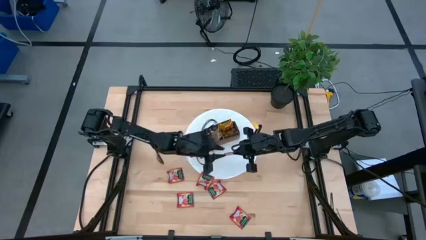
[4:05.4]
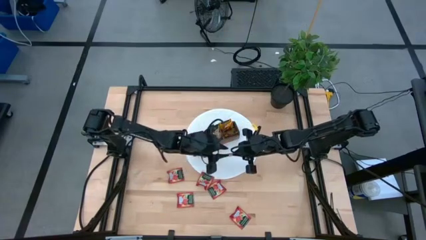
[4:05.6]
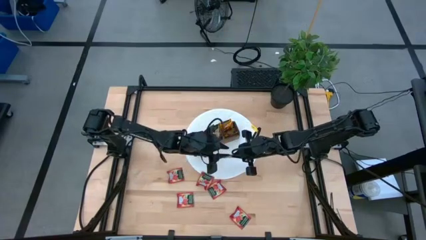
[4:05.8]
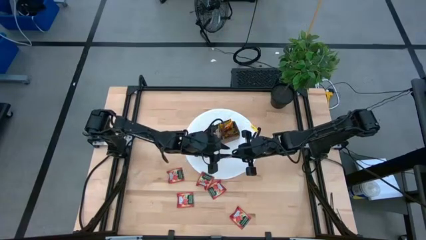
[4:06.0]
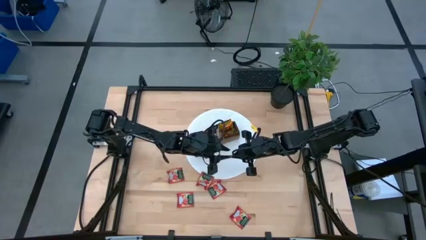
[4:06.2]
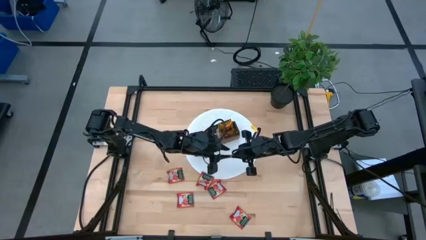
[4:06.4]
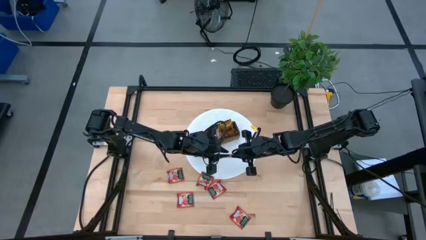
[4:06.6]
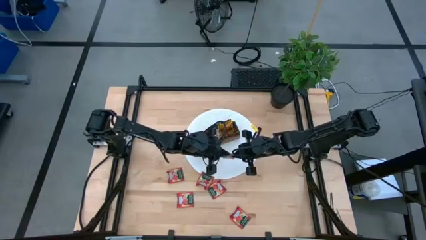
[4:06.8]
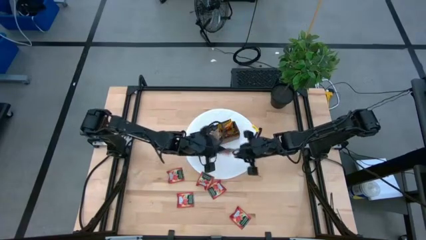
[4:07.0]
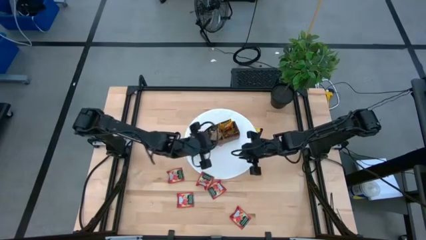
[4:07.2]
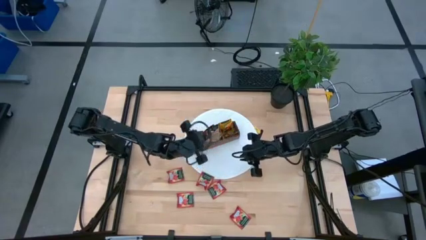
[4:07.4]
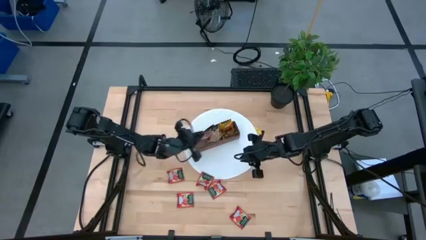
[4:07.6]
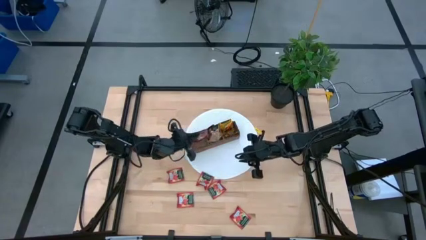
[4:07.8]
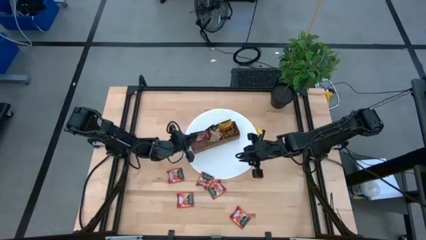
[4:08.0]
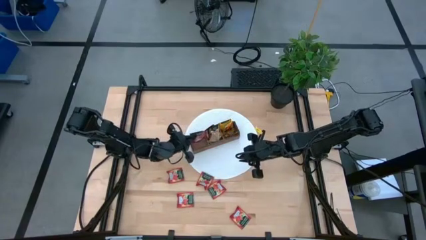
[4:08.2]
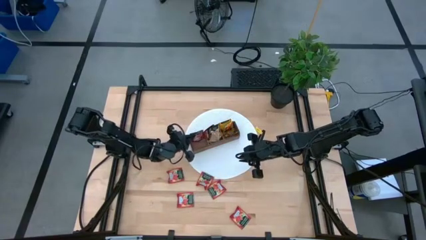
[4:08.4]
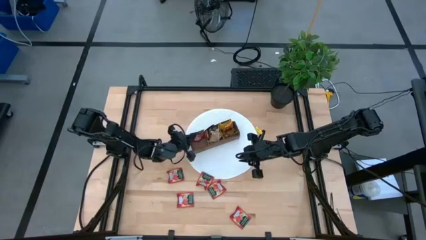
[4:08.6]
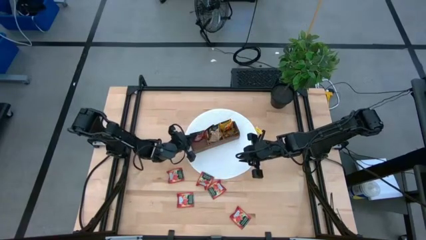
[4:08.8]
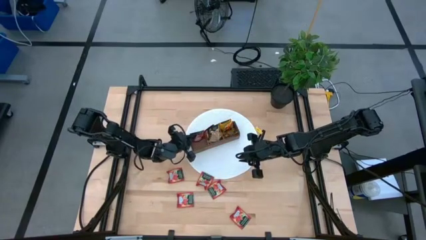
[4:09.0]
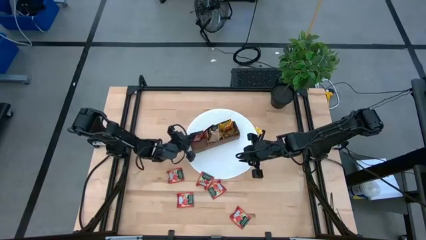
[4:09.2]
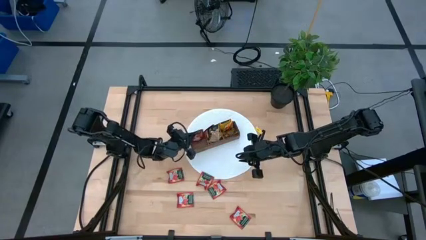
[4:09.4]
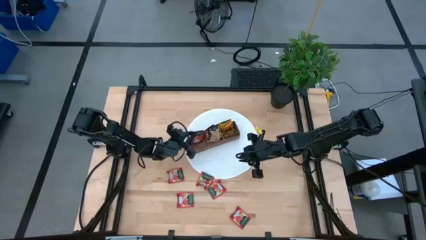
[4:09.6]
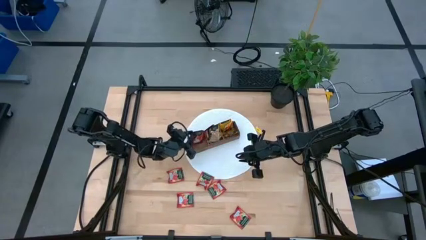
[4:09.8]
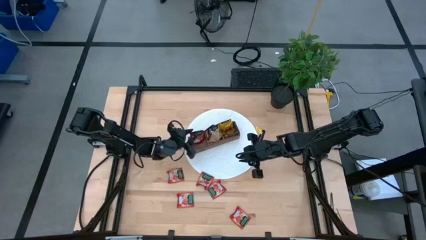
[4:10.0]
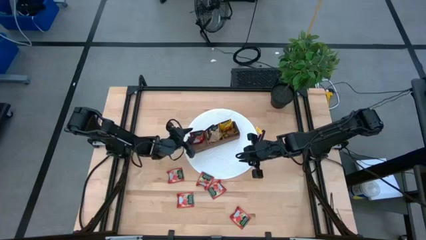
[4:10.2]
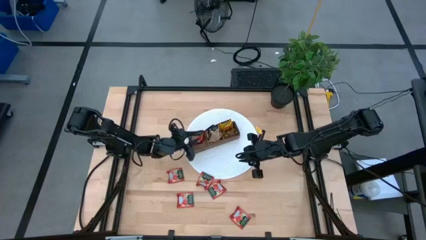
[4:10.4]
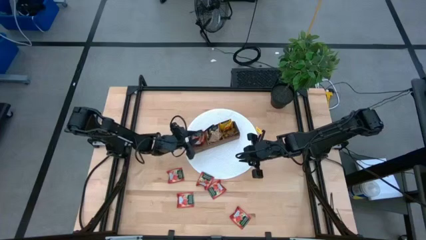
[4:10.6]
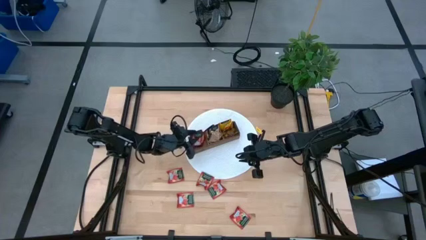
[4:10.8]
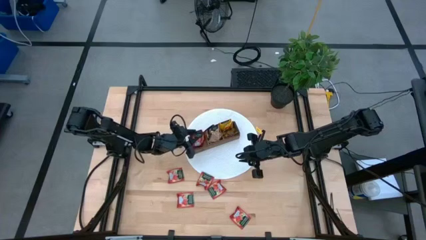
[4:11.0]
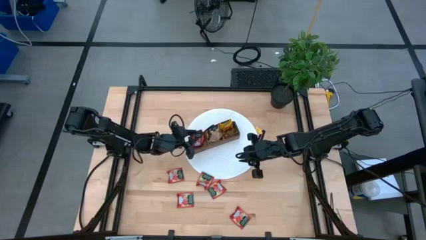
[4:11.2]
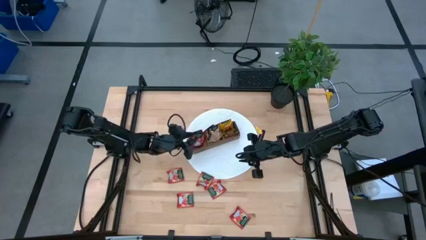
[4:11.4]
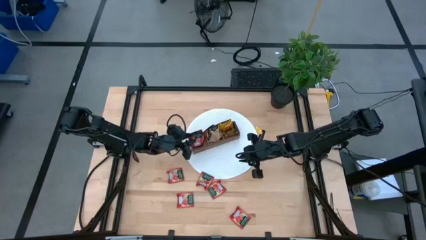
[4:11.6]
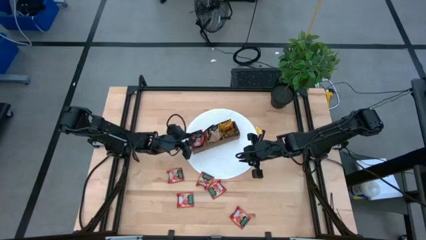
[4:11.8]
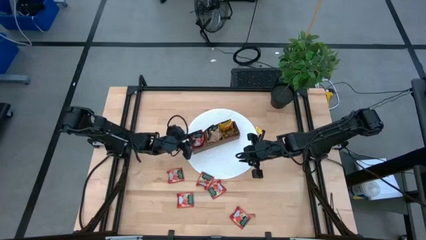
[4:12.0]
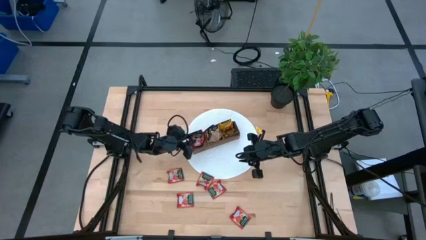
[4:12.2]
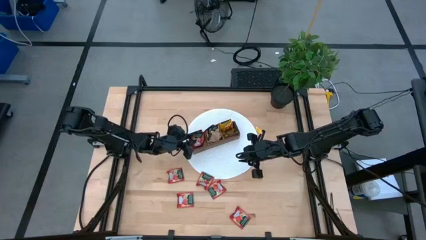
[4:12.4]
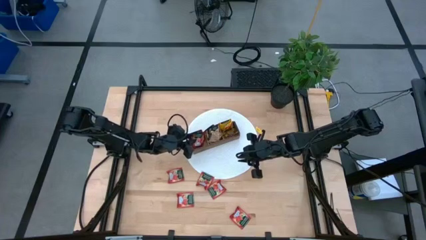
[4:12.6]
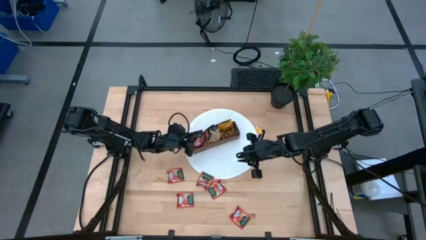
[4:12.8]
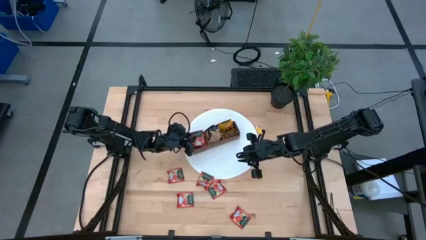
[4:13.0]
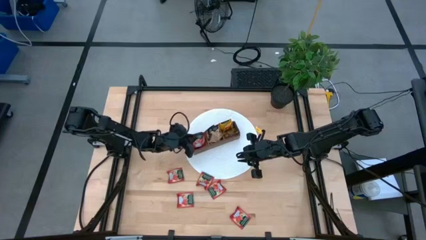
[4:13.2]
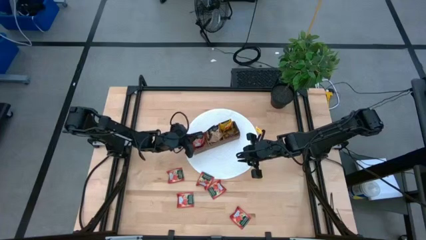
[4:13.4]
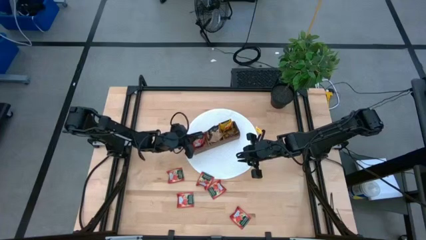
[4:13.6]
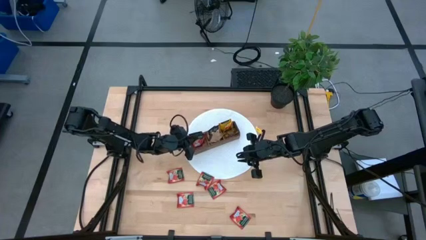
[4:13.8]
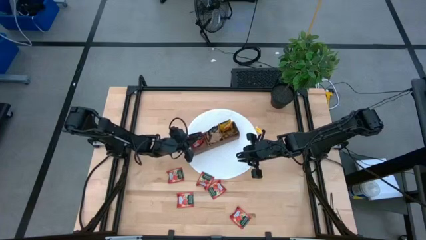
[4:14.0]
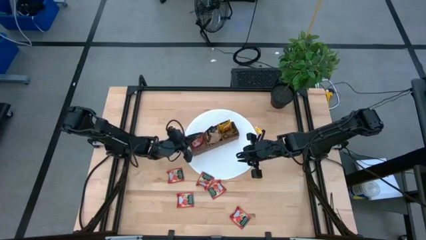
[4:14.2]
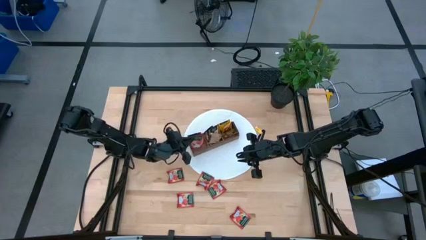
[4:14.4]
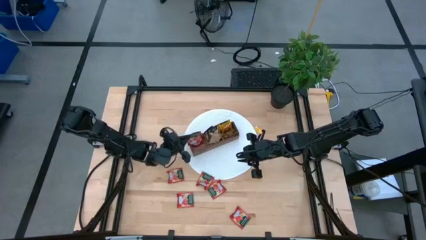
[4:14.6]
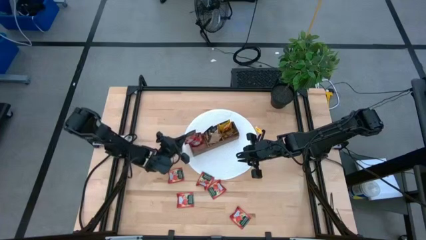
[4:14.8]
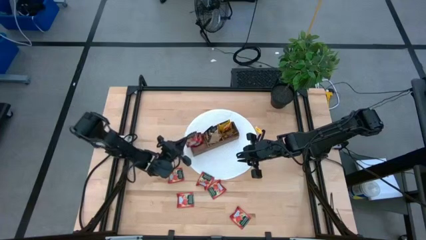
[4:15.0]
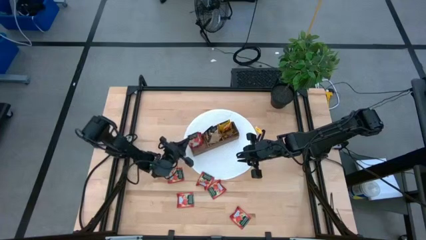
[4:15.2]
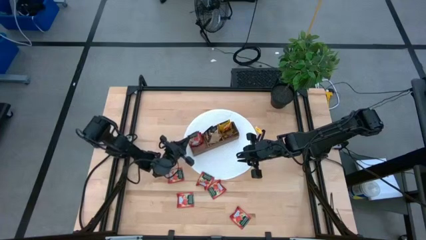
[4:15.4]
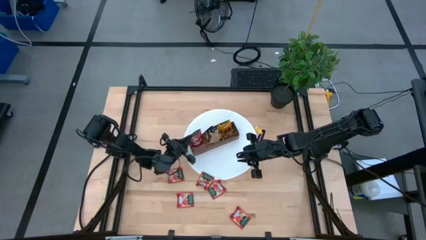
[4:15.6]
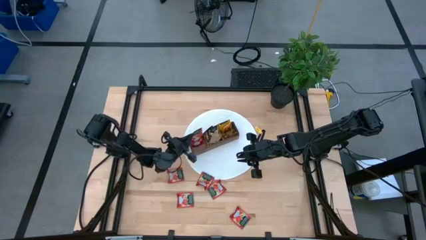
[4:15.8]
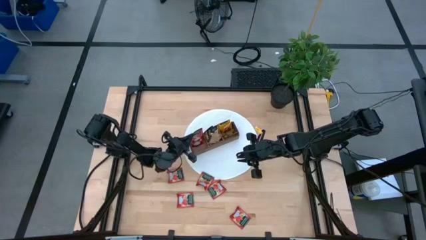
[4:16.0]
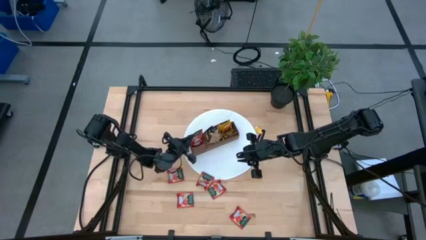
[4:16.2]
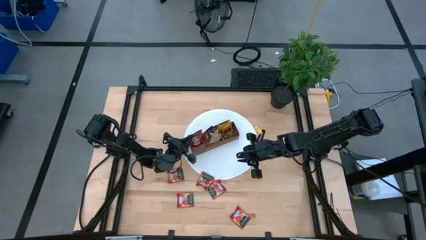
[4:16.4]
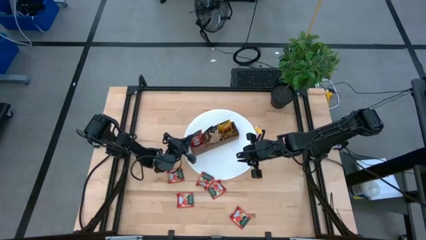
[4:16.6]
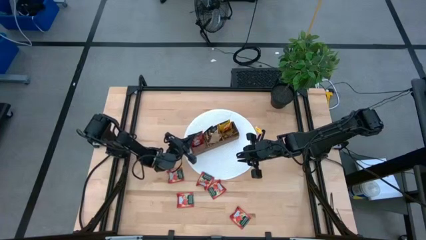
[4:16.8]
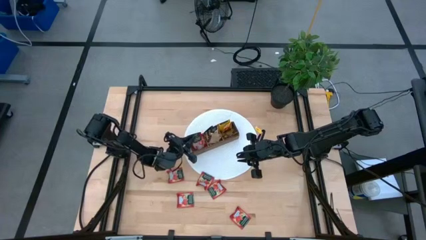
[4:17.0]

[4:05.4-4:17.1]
Task: Pick & Place Tea
Put the red tea bag into the left section of the wooden organizer

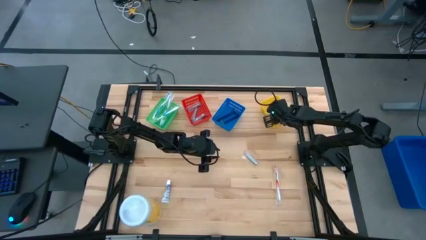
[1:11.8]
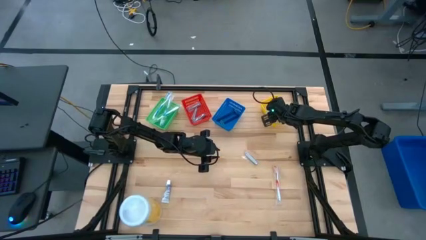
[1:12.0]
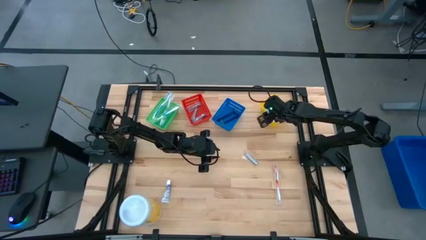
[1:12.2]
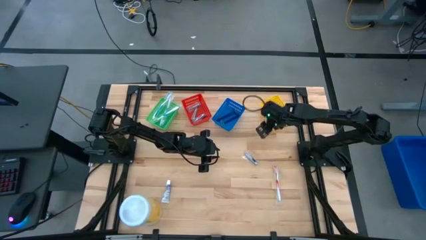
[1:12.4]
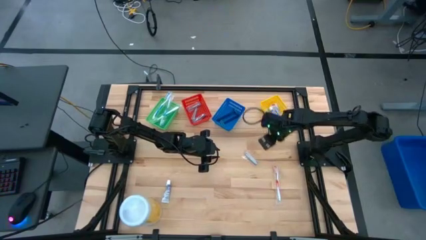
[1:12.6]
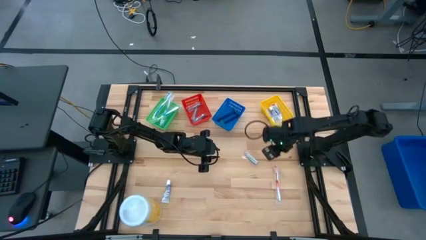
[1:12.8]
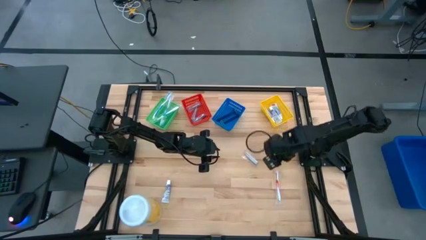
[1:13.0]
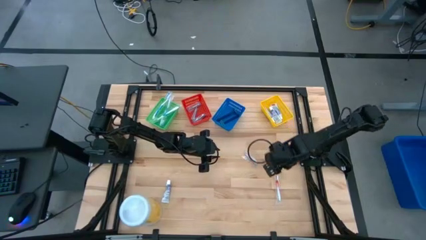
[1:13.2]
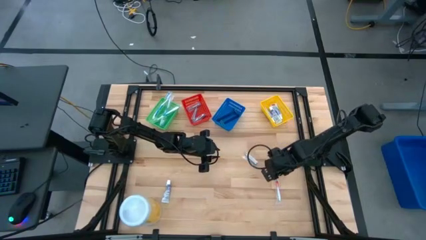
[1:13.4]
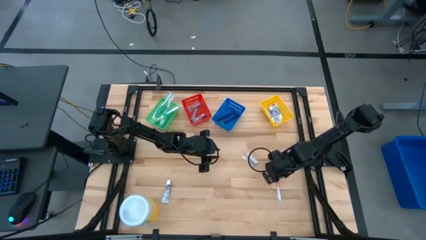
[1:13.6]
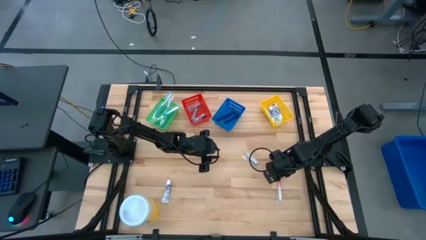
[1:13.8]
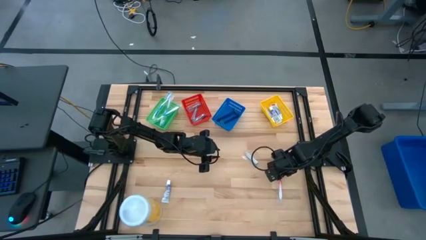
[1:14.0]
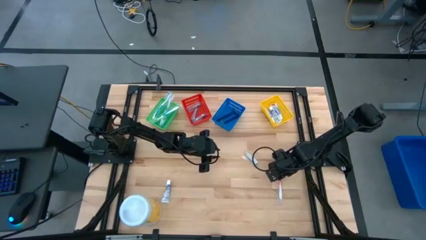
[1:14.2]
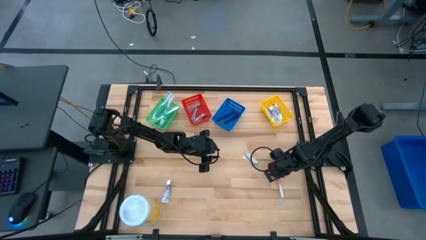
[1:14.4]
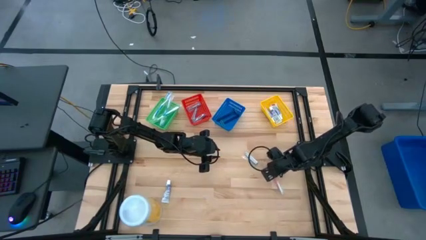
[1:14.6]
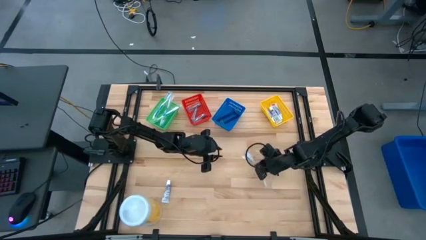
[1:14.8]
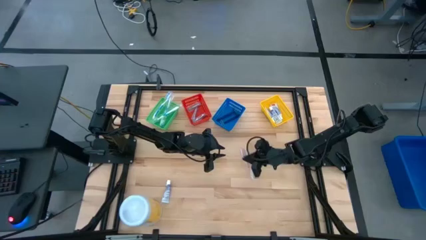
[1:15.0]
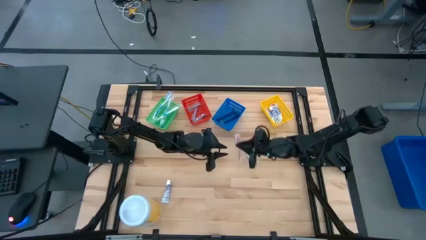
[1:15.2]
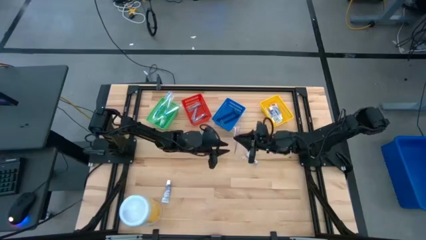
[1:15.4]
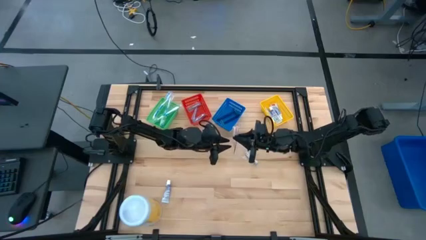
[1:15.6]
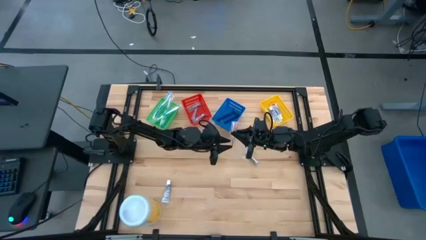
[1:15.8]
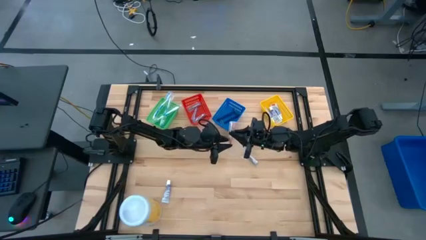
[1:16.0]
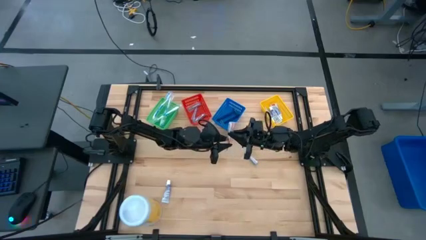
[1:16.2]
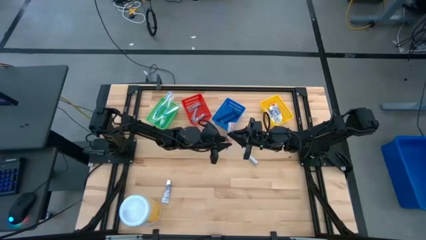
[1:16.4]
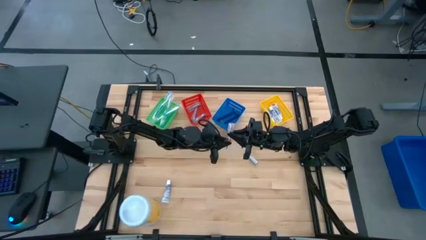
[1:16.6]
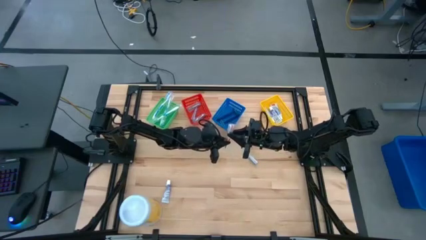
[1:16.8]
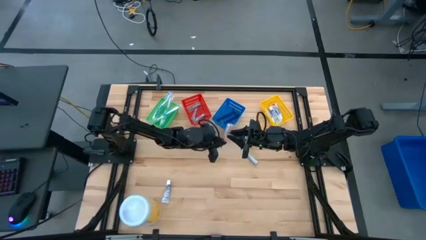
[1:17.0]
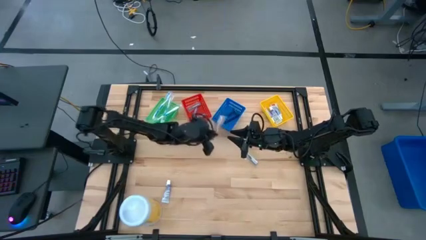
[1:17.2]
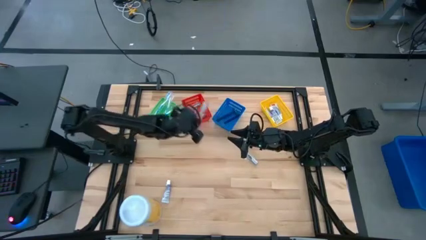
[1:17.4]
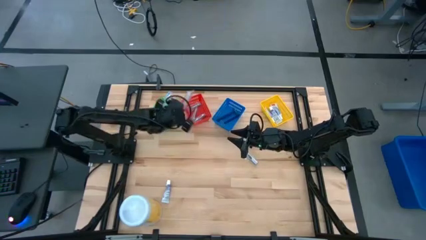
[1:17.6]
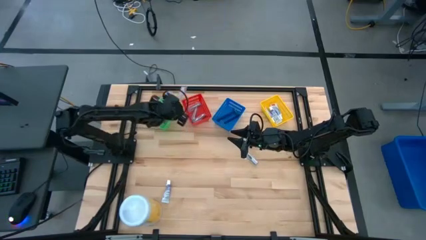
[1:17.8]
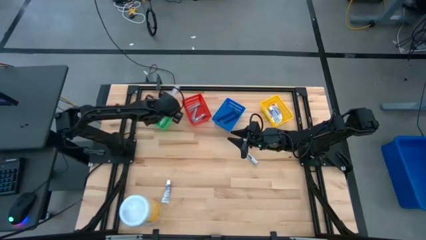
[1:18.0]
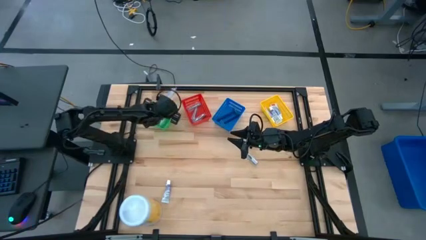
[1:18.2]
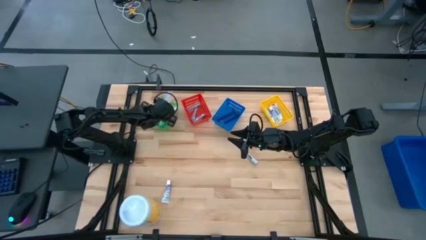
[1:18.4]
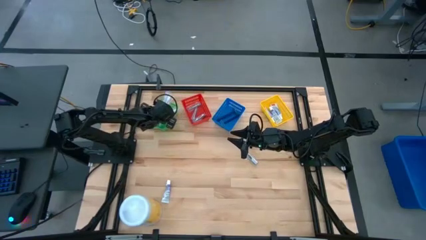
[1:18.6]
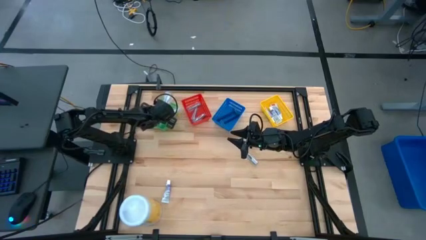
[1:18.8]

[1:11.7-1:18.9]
Task: Pick & Place Travel size toiletries
Put the red toothbrush into the green basket
